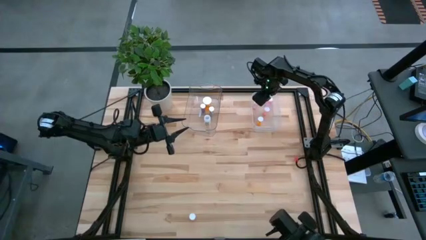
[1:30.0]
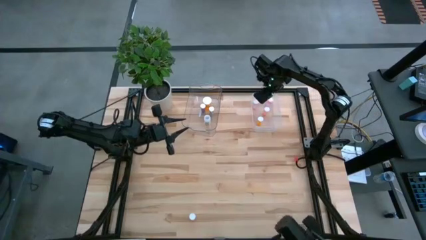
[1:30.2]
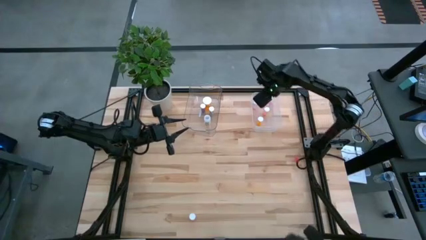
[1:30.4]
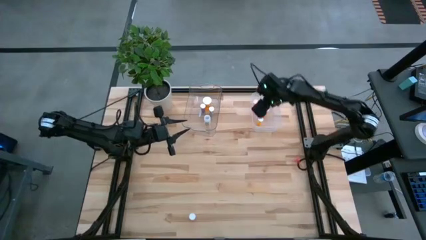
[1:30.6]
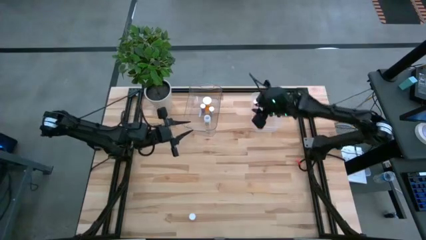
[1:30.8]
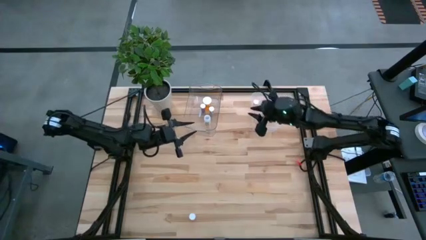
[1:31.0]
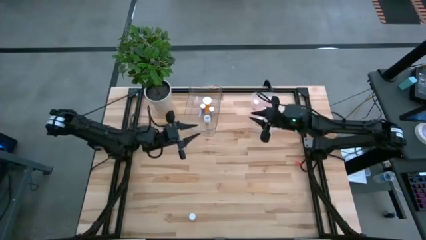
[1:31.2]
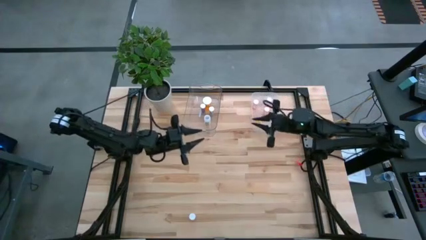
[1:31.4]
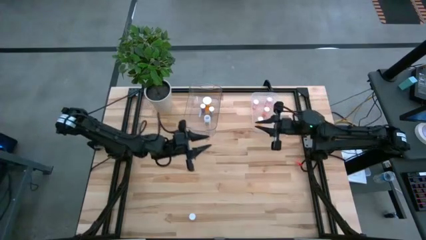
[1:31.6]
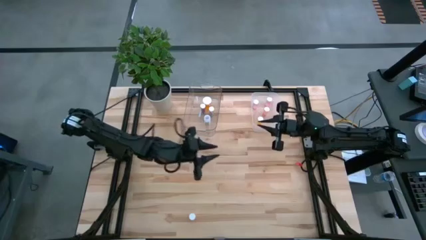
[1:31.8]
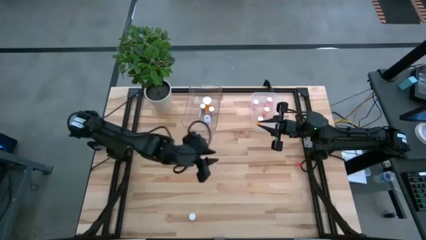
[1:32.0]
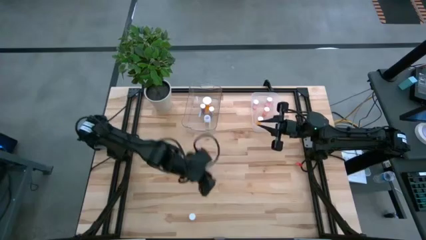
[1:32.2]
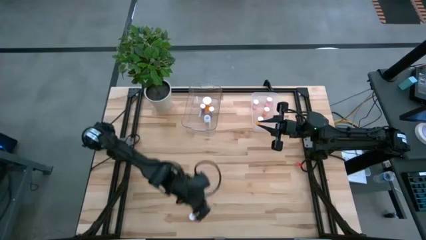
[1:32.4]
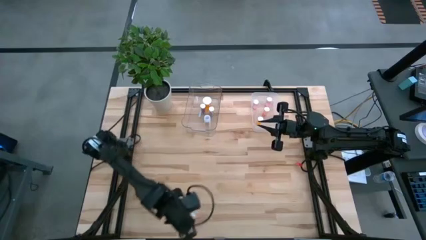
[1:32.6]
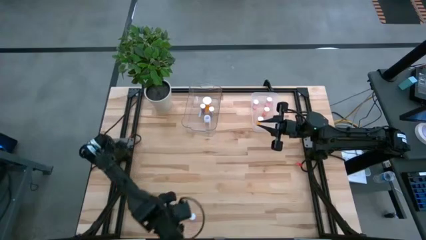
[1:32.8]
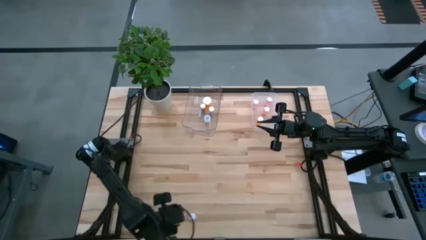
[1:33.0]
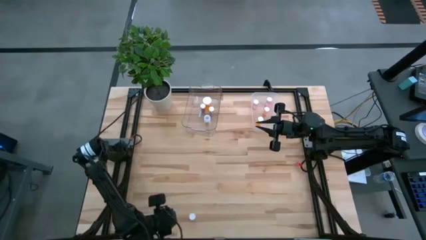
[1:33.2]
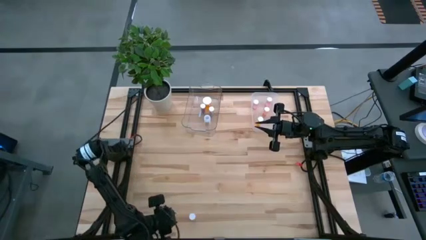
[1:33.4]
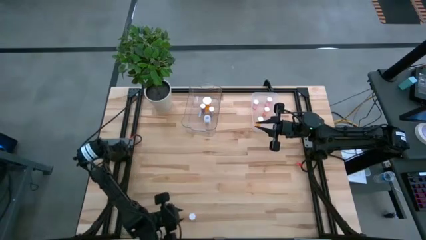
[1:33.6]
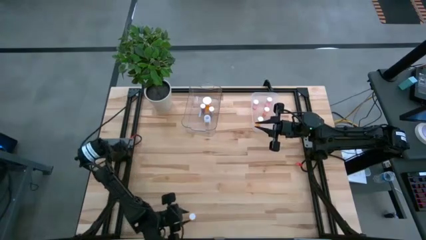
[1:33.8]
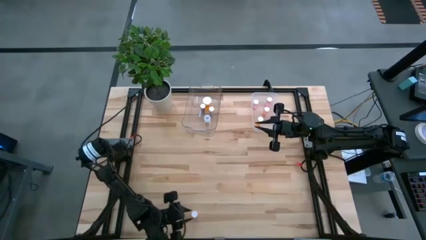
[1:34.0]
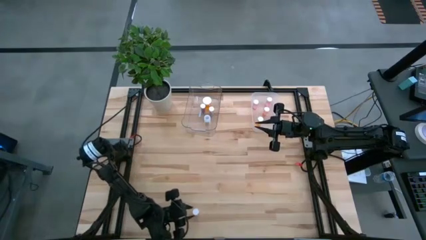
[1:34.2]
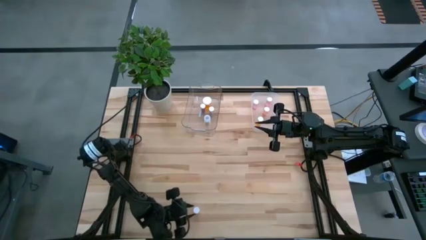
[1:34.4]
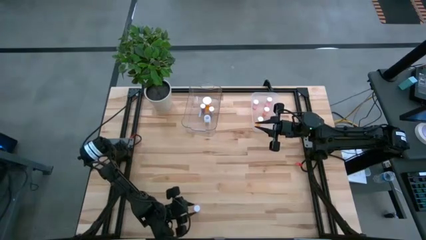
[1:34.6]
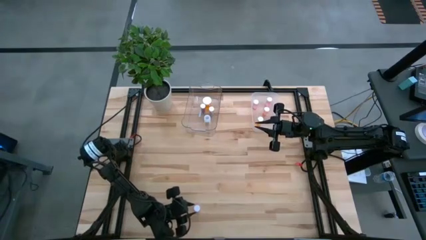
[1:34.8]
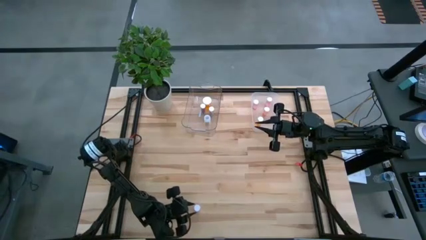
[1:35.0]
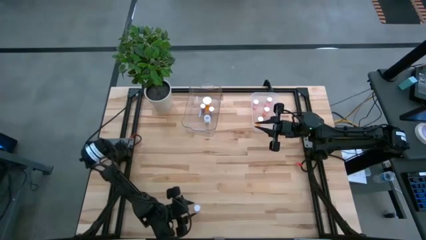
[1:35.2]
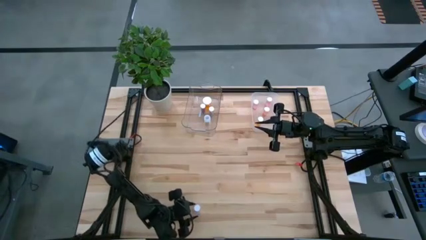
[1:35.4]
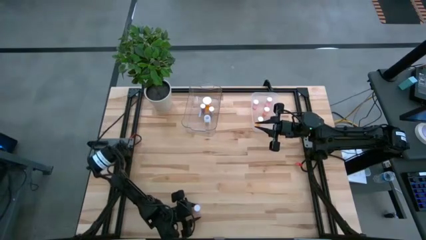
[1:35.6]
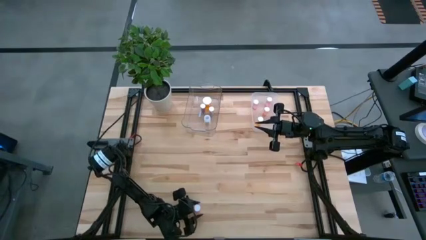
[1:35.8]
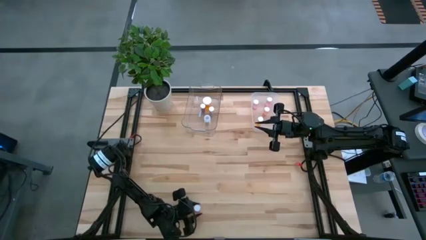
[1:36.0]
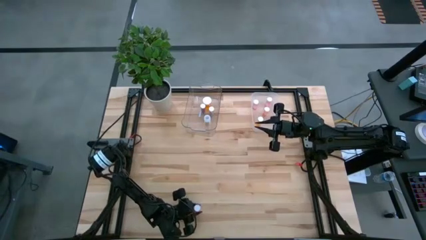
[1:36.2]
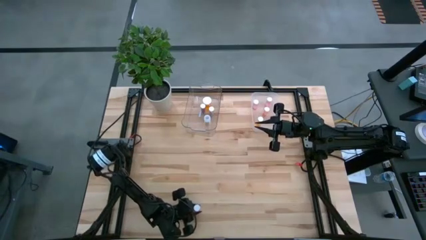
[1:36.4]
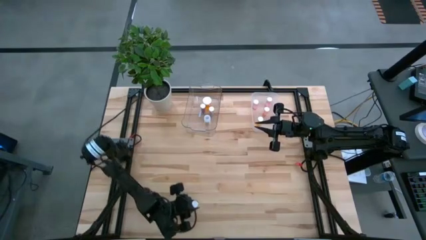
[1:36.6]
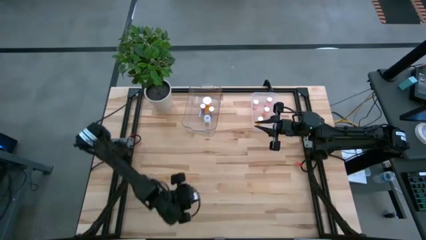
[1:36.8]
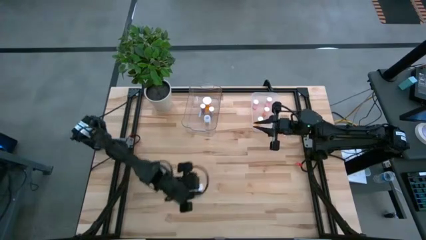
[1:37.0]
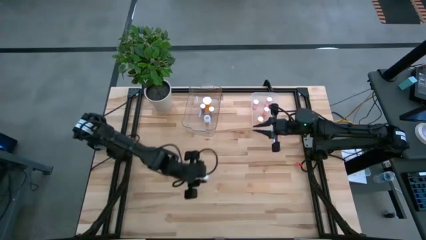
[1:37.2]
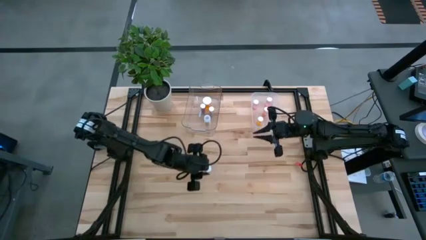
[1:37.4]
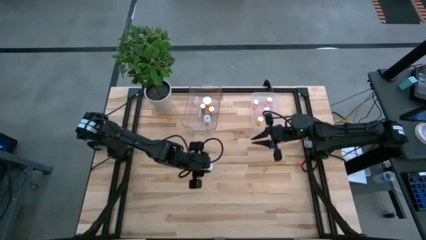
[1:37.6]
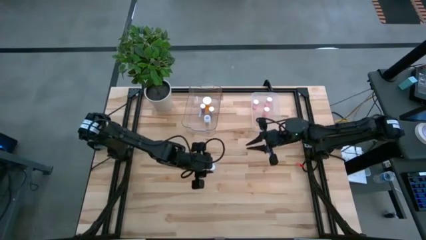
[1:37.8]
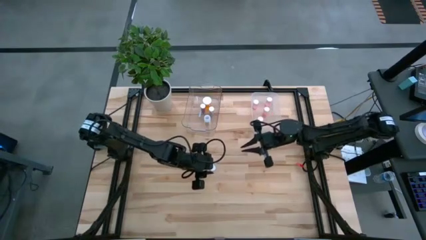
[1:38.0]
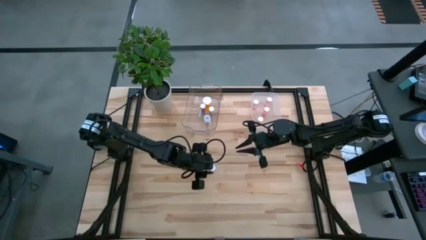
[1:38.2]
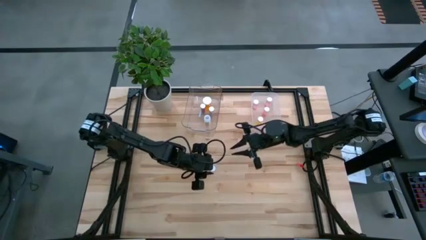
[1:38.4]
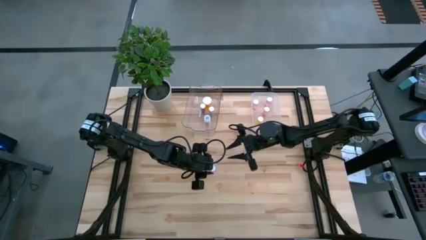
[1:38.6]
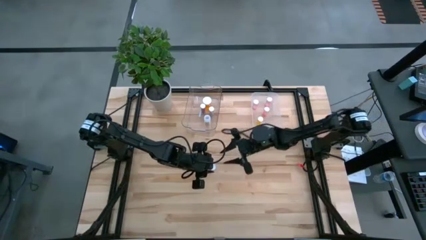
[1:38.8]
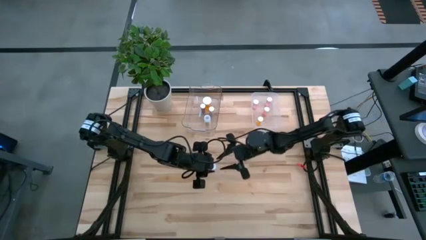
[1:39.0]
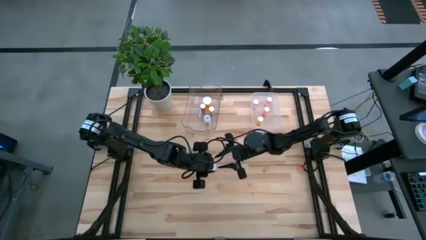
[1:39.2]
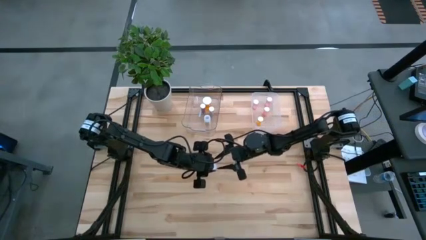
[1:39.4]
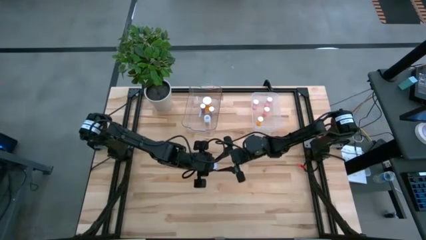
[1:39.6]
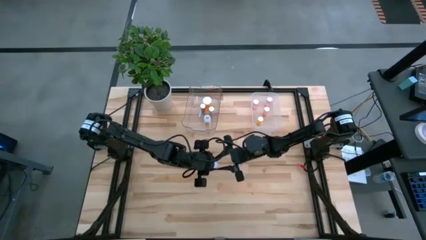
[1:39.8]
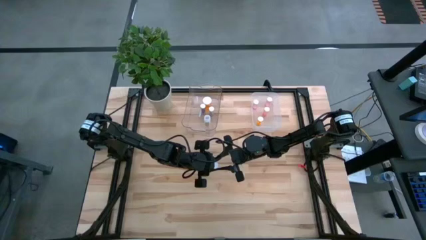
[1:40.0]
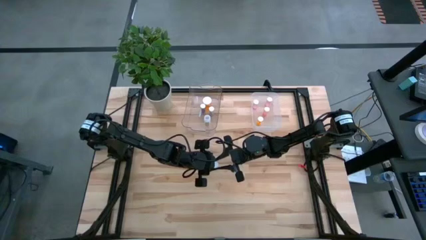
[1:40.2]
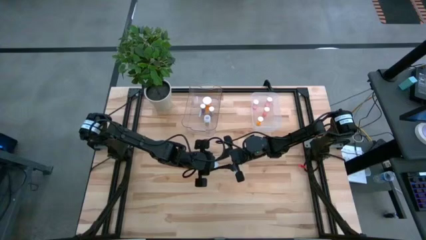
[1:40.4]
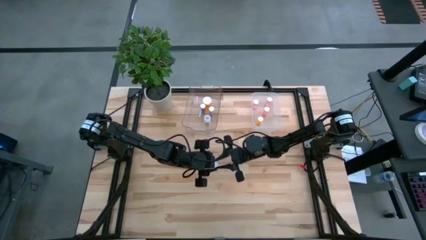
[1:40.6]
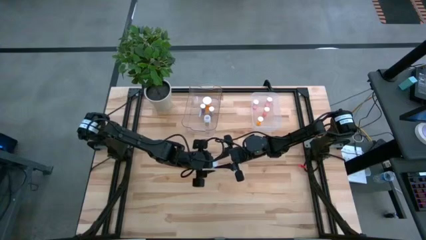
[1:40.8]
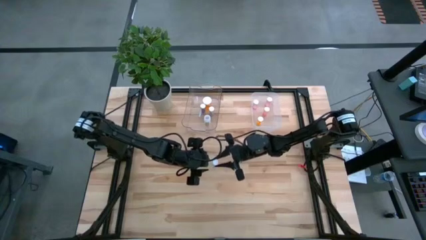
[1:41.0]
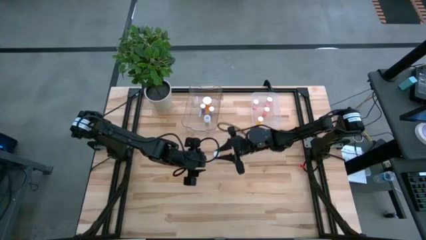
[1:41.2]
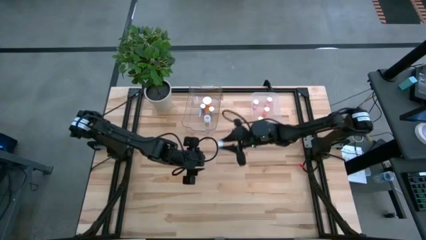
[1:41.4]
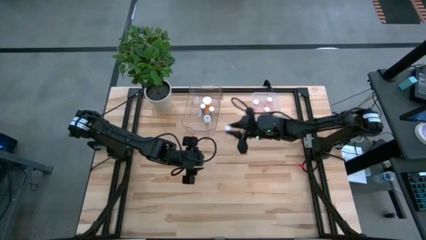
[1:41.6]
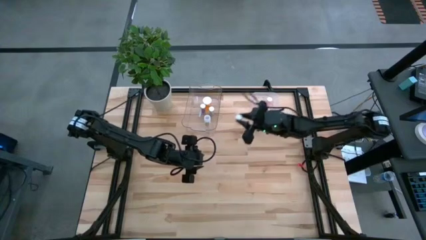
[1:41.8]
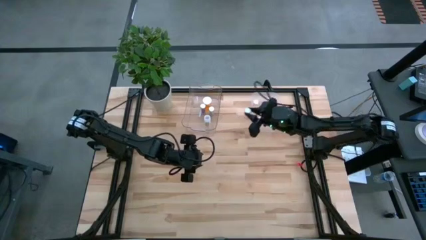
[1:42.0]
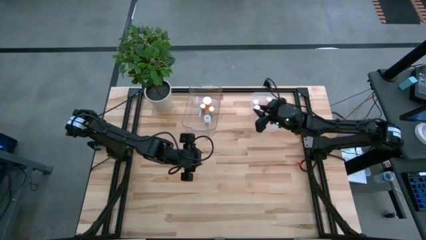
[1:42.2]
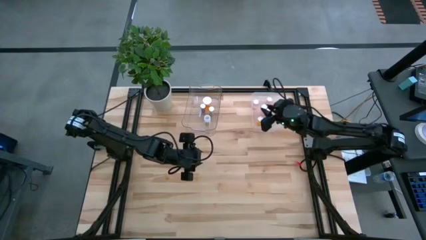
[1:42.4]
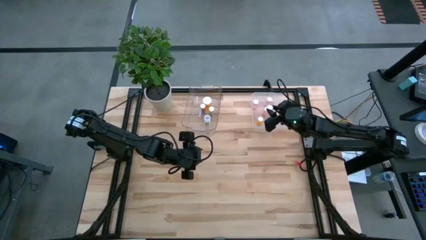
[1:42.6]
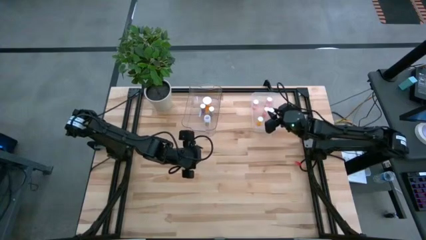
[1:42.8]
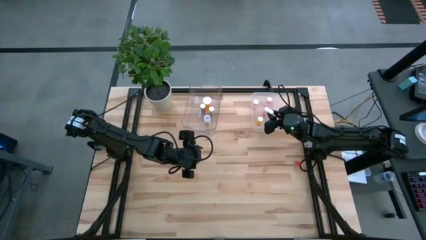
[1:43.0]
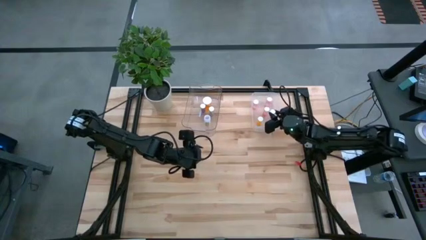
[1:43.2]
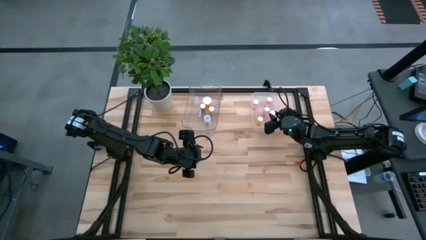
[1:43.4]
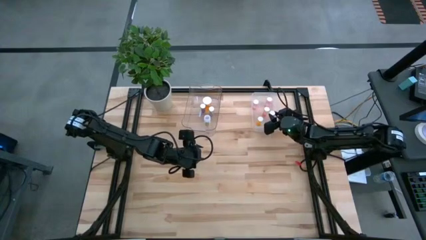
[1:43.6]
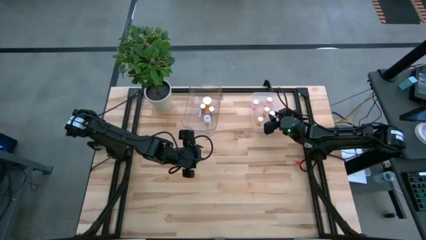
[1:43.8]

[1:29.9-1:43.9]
Task: Pick and place medicine bottles into bin by pill shape (circle, oval)
Put the pink tablet pill bottle into the right transparent bin

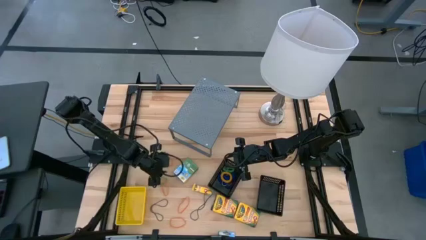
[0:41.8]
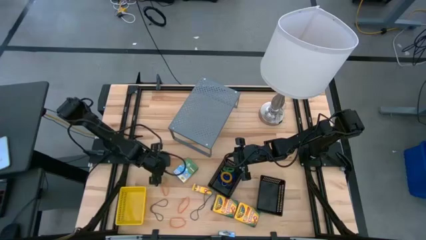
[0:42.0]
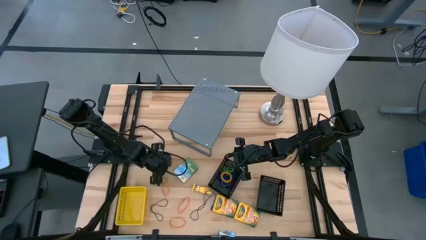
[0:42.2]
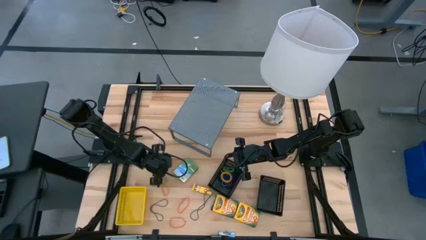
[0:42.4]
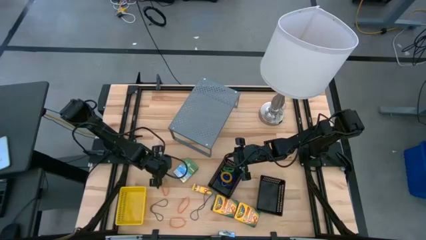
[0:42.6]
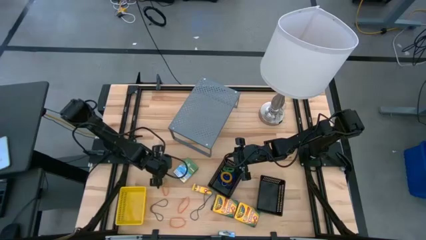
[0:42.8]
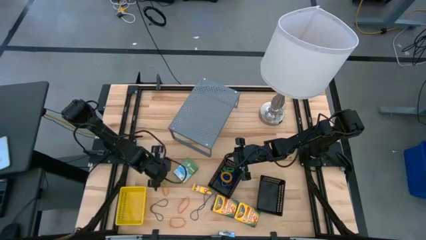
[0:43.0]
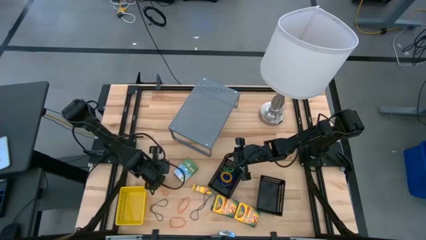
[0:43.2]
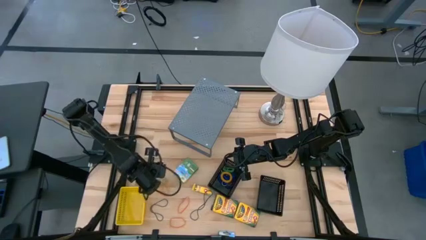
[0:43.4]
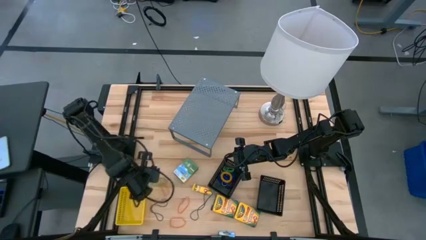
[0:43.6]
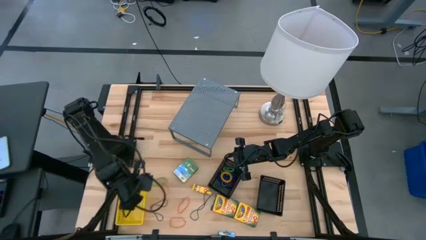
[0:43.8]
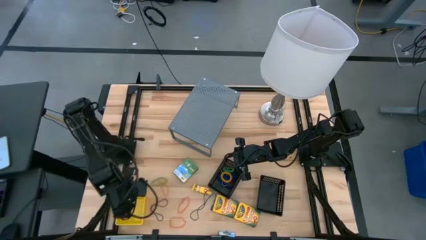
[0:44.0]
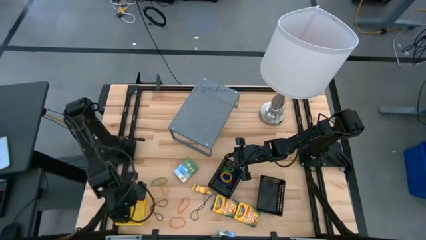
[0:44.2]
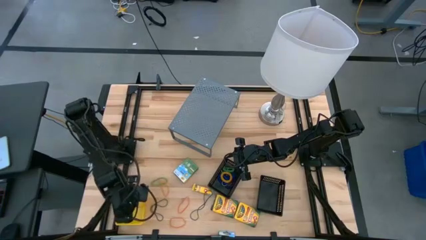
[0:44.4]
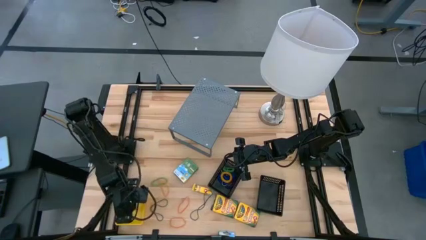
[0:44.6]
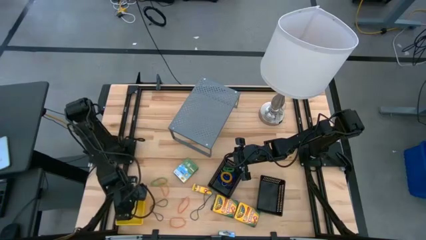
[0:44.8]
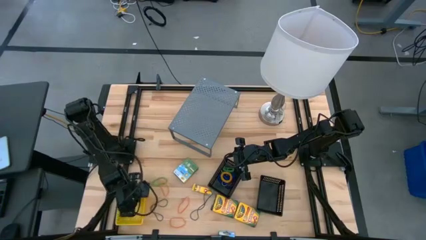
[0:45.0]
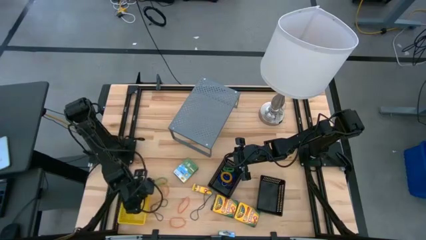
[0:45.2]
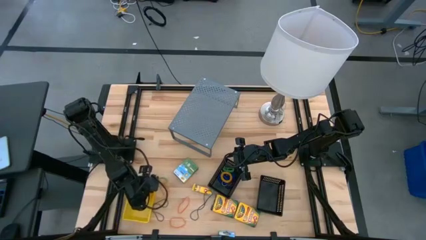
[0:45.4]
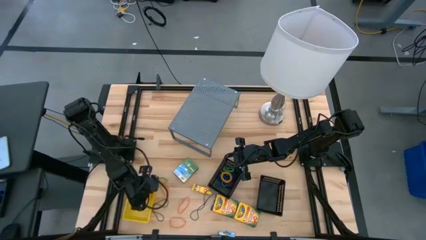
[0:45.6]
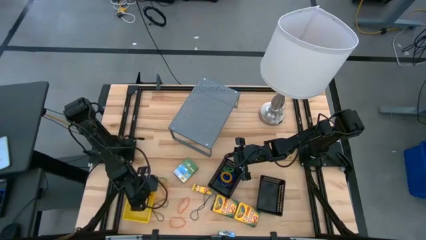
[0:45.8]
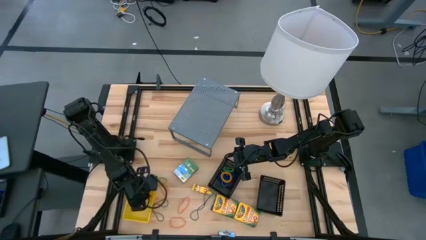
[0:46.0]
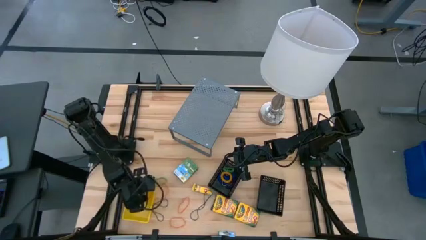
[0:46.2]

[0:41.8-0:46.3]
Task: Pick & Place Office Desk Supplies
Put the orange rubber band into the yellow bin
